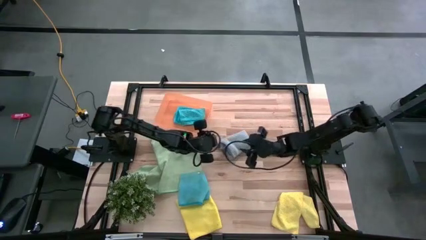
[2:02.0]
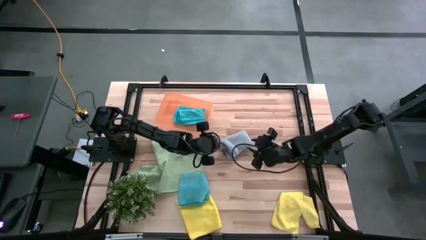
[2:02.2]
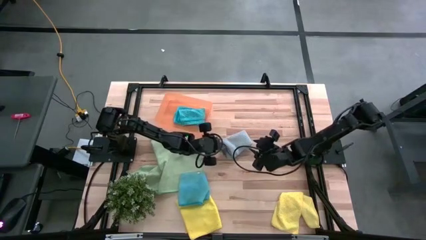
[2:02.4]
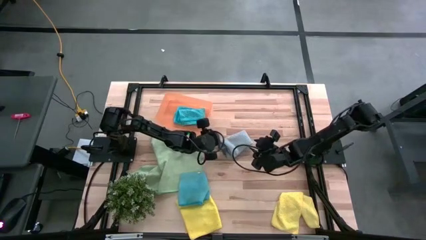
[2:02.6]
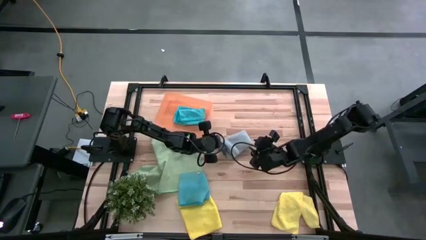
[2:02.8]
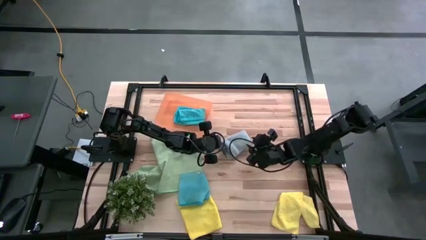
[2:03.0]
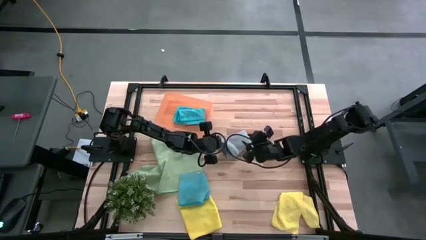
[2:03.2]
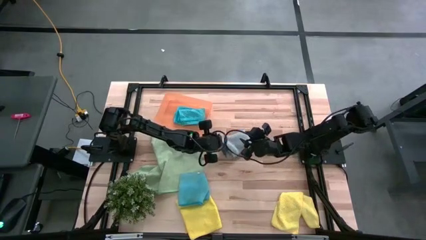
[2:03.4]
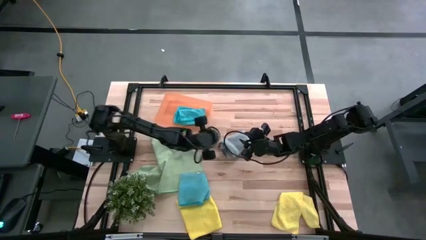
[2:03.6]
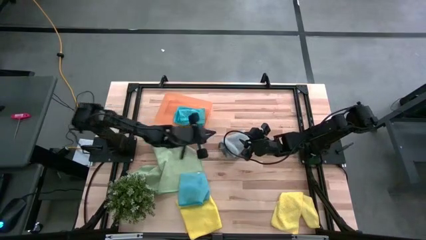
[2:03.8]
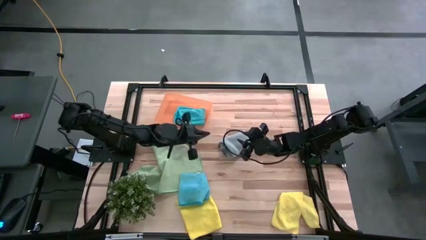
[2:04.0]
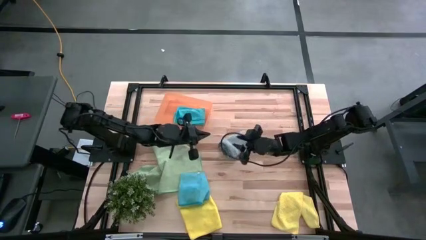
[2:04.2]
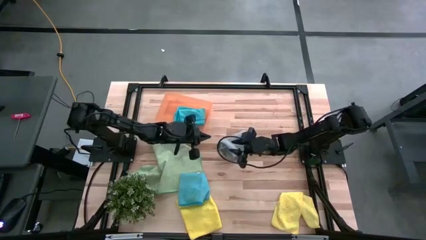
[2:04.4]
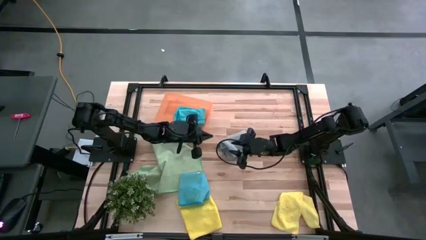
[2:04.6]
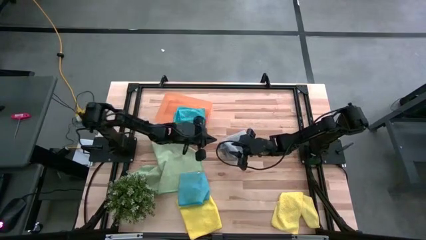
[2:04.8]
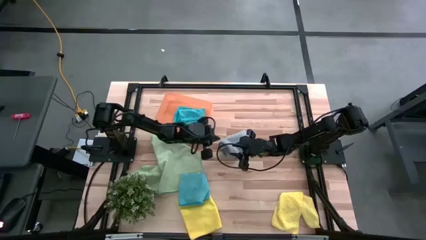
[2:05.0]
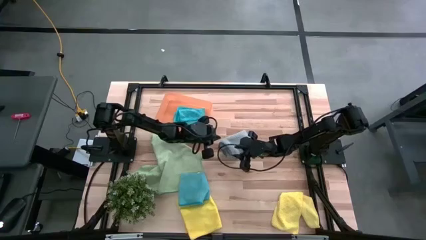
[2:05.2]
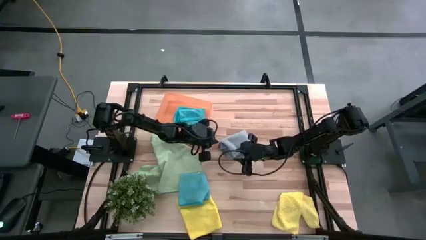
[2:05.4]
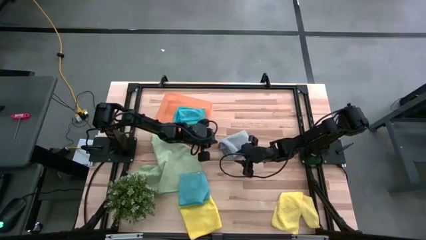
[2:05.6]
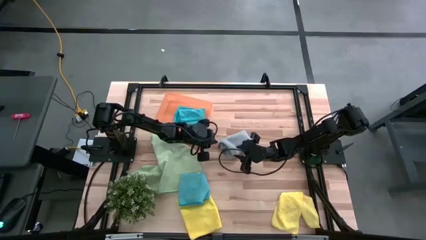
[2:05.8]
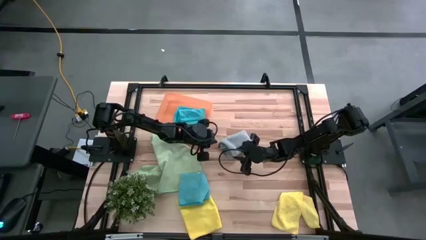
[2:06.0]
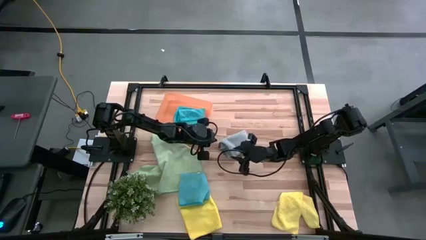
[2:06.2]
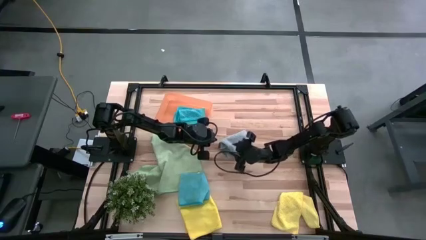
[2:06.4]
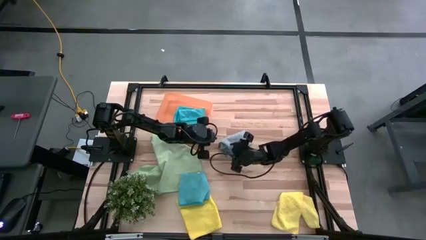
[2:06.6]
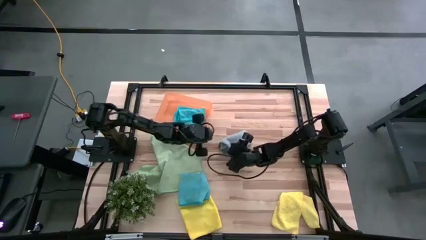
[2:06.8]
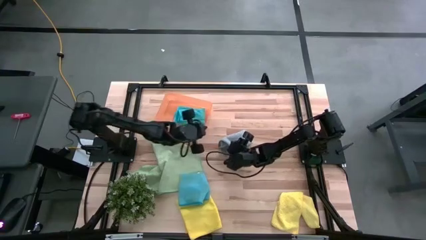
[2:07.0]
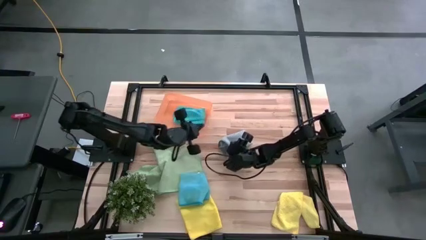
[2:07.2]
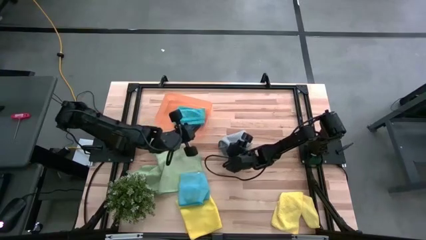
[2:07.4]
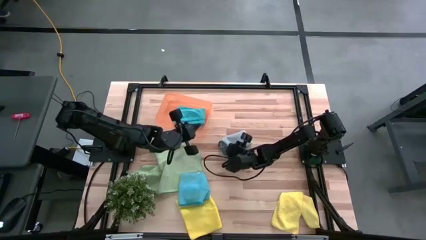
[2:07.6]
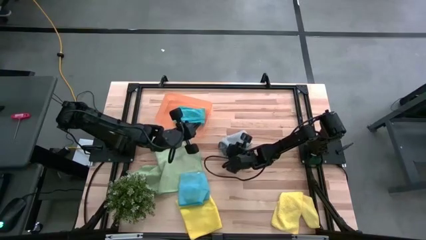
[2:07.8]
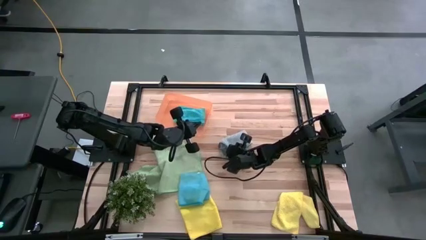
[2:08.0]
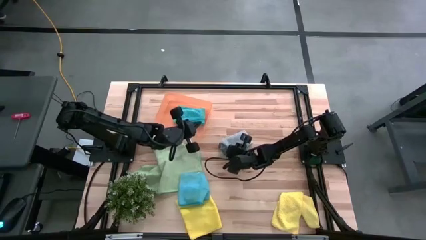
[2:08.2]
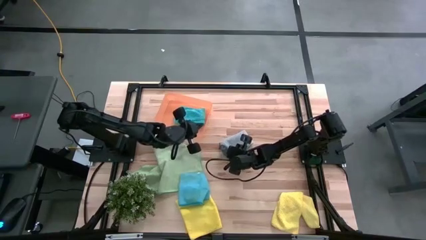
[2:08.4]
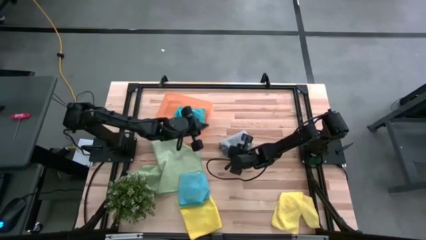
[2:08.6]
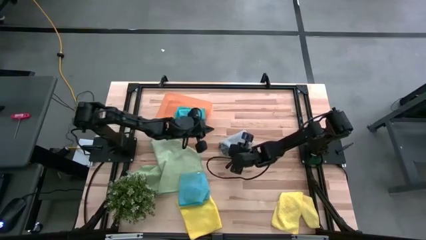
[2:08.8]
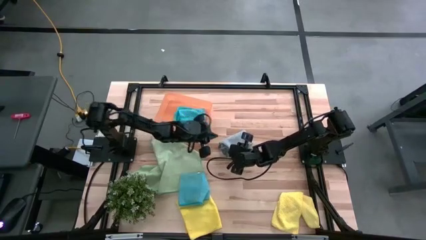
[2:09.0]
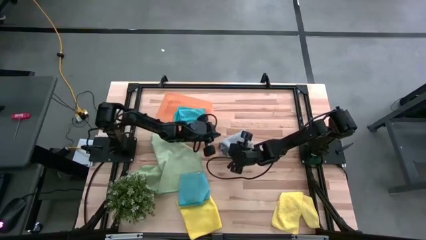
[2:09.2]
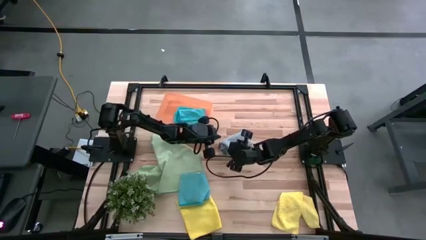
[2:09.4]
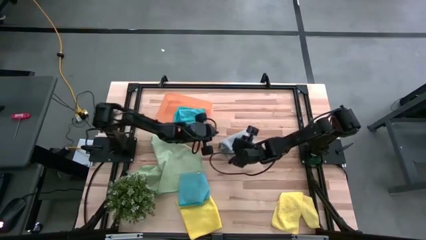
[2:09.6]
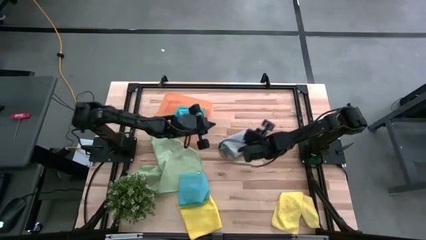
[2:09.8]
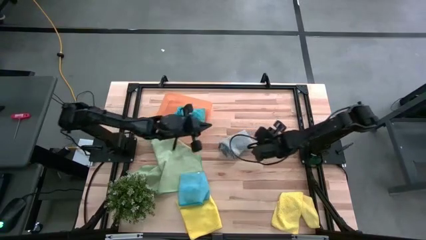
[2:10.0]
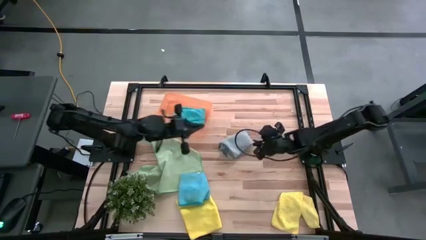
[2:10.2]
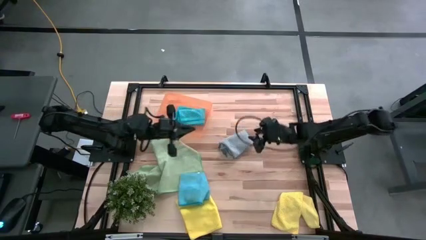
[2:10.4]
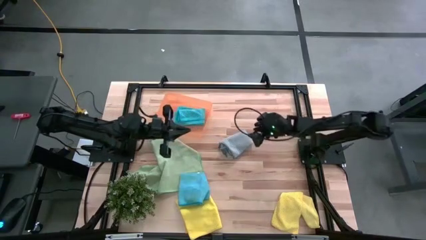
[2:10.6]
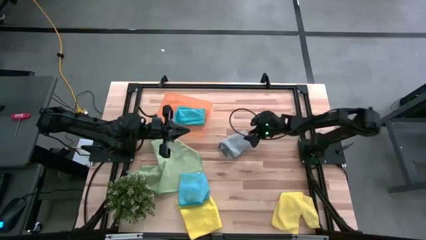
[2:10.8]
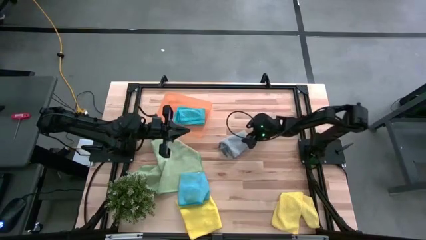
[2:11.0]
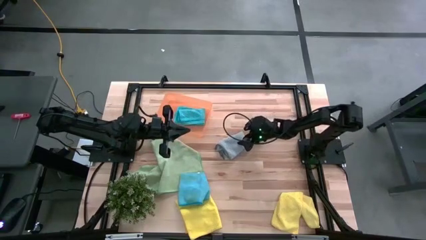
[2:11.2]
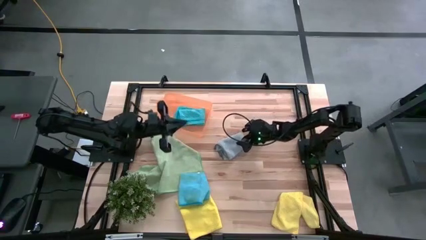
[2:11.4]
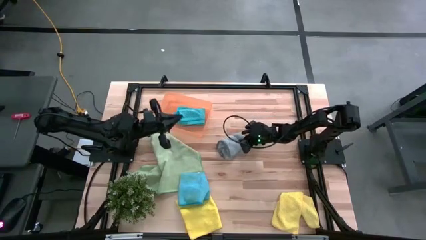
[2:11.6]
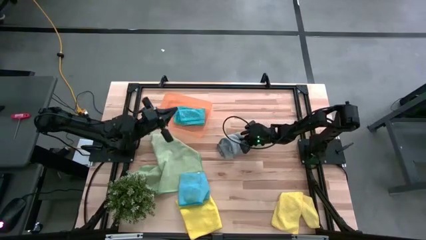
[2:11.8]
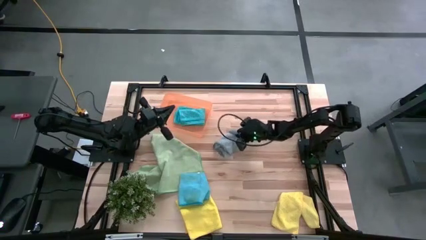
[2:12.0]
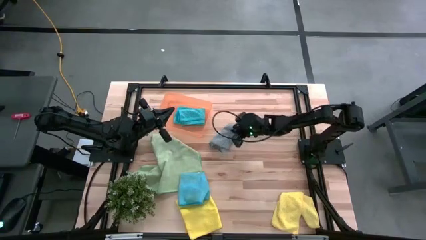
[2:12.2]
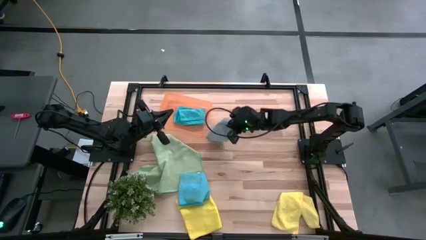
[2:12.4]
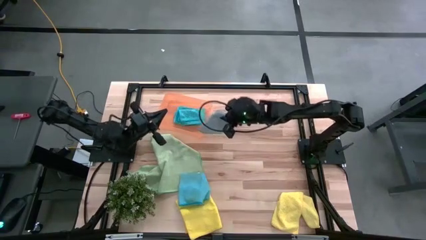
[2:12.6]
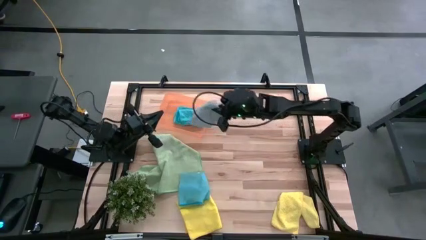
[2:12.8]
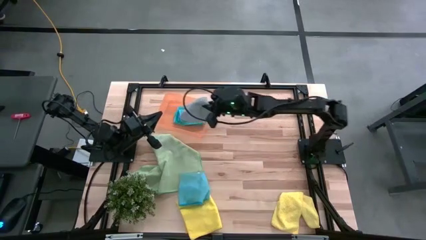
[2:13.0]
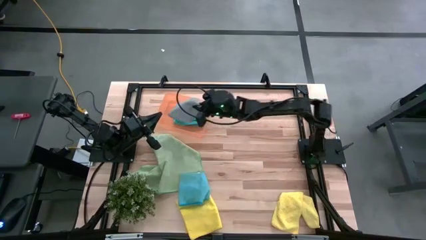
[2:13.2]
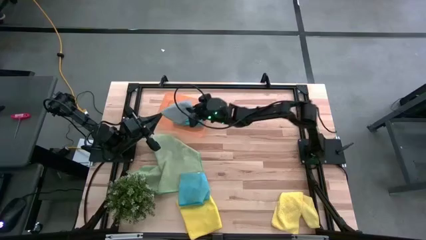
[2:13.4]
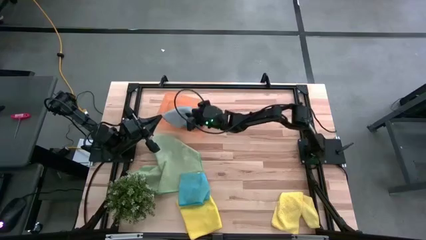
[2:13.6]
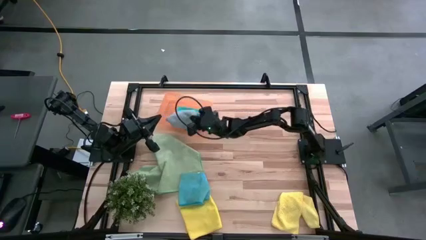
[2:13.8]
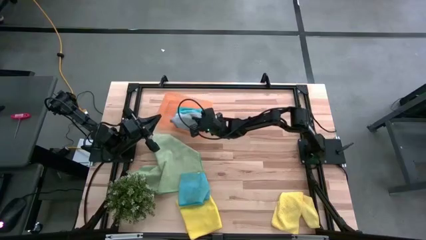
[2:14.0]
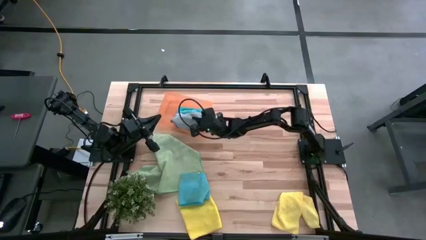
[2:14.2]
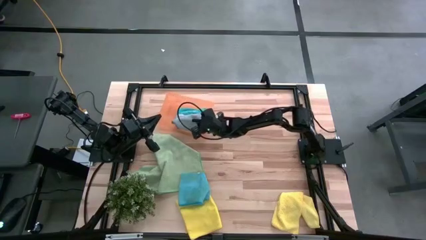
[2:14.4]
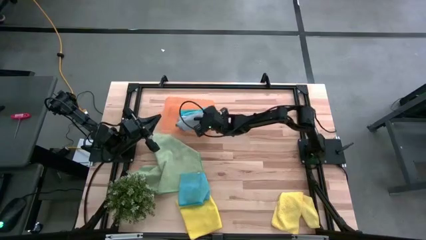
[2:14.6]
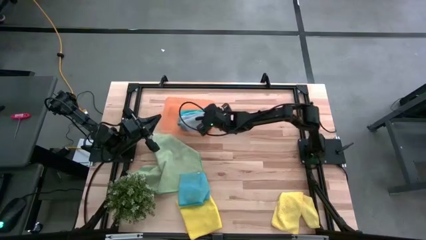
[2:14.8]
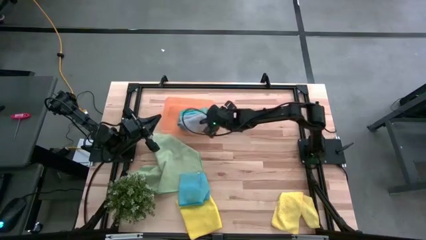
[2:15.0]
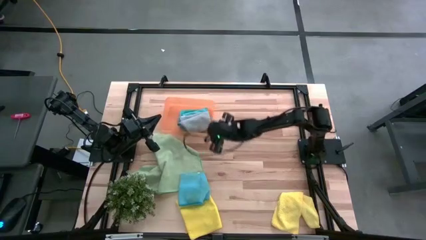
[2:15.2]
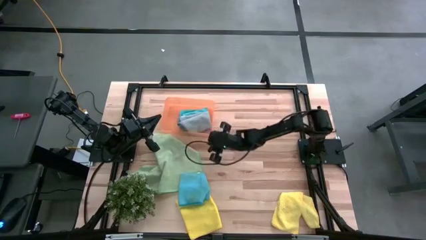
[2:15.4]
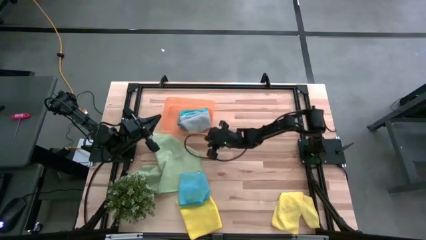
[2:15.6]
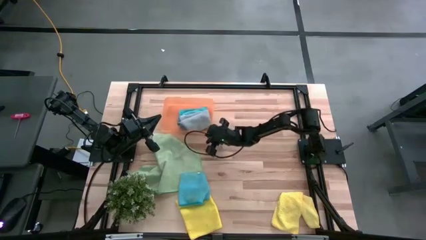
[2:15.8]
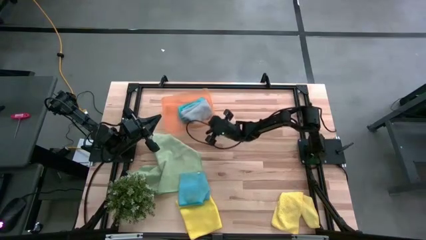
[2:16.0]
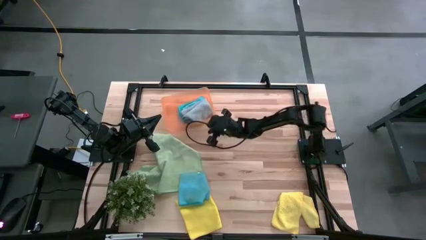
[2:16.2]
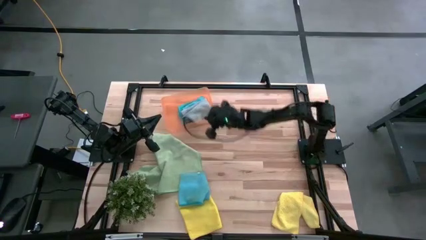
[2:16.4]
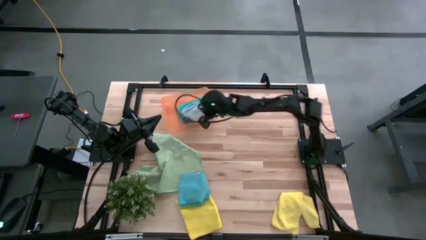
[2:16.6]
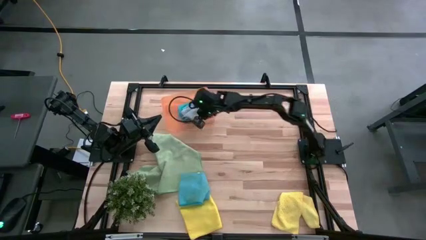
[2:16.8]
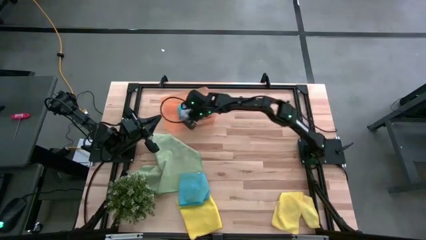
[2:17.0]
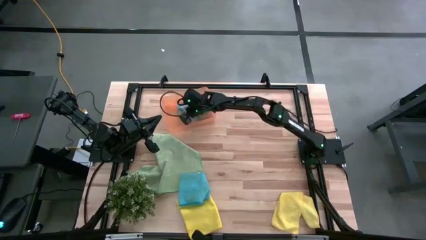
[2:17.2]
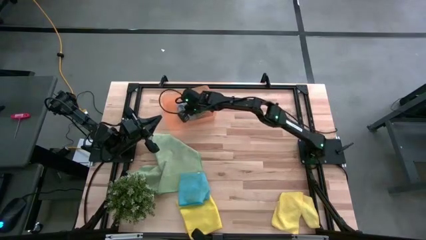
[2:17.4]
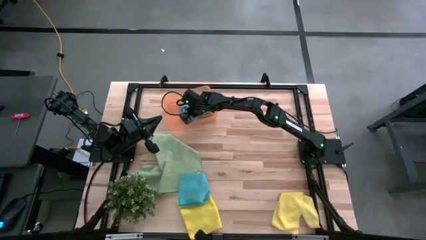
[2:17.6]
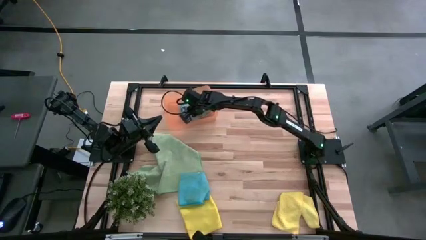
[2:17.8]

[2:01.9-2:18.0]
Task: Fold microfiber towels
Put the gray microfiber cloth into the orange bin
